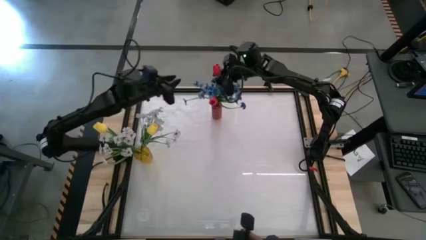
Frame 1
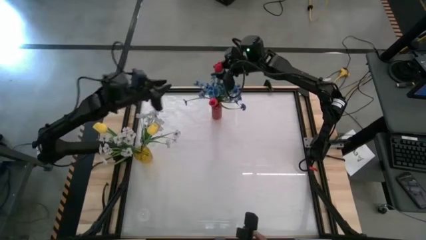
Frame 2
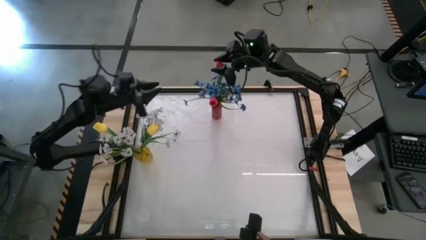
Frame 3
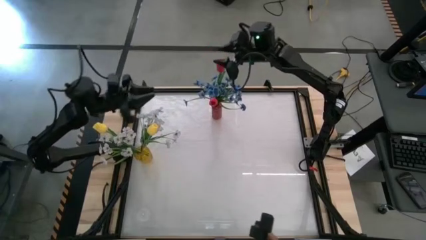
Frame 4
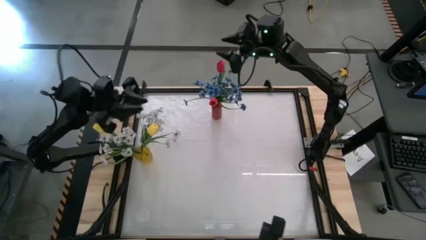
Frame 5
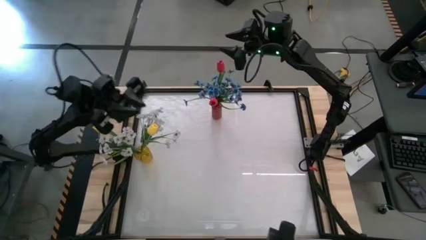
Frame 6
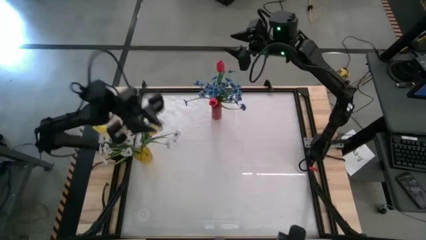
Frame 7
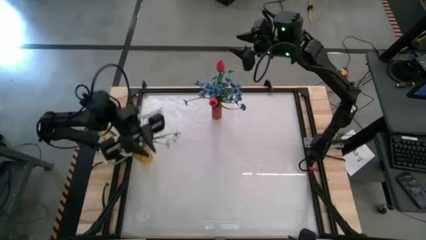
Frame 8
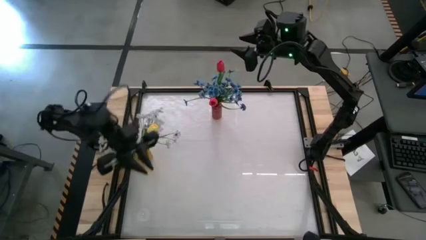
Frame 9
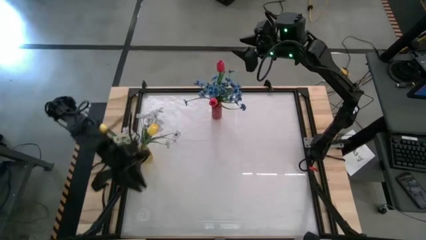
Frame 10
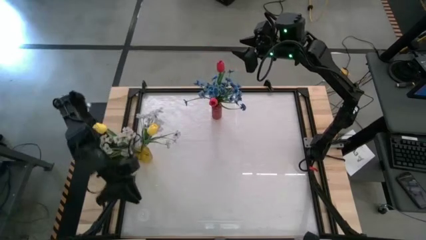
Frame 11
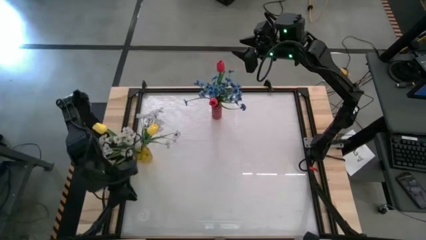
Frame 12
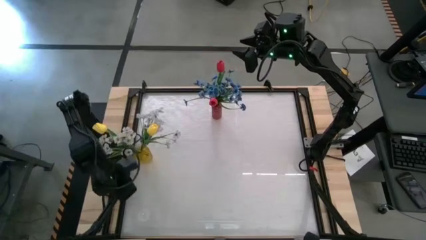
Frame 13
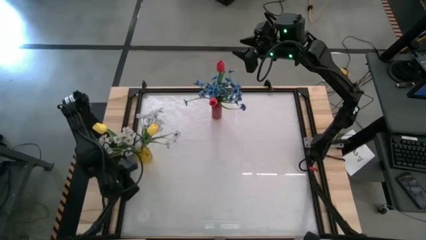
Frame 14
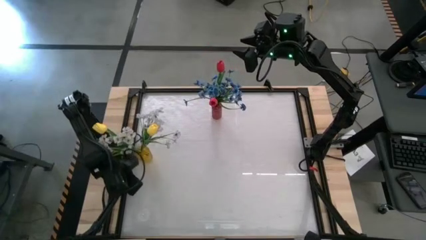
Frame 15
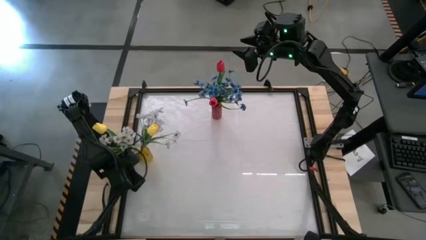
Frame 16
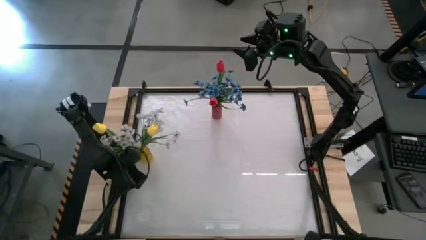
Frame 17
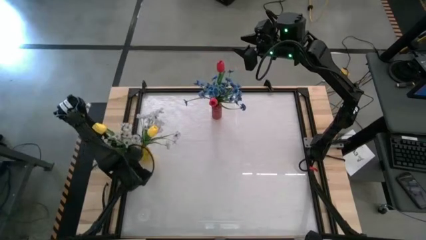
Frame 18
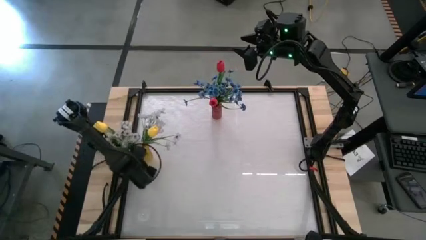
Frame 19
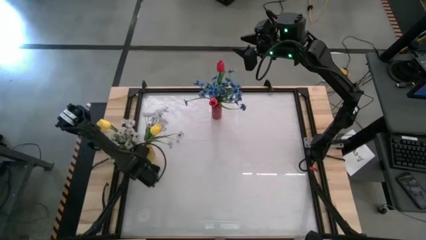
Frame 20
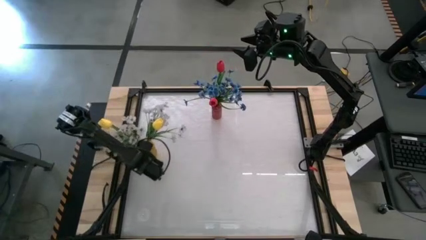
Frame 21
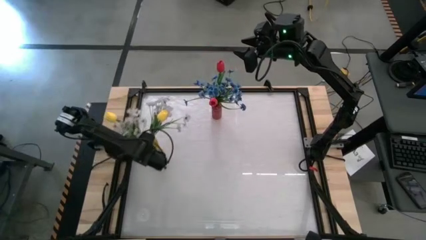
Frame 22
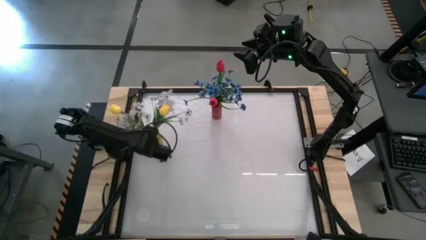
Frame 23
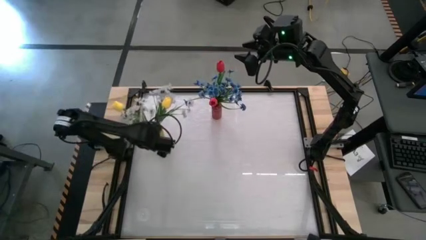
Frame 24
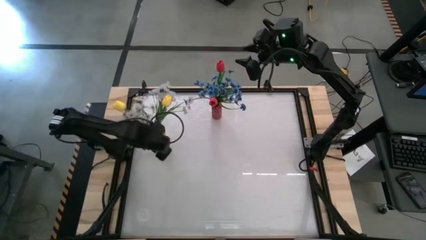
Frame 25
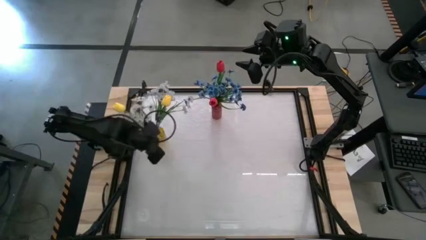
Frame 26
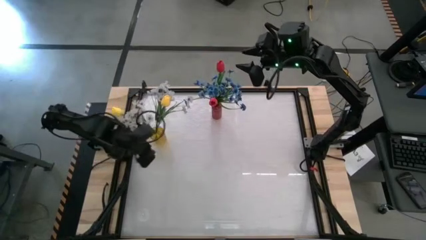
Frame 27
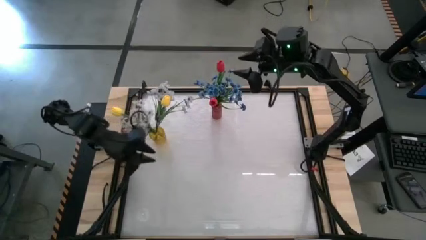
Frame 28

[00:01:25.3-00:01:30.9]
Task: Sort flowers into vase by color
Adjust the yellow flower vase

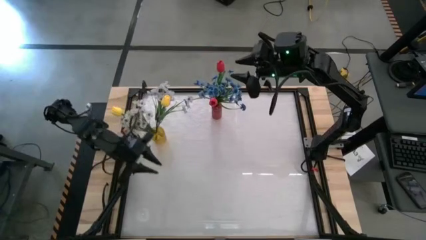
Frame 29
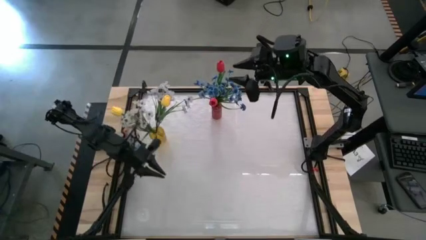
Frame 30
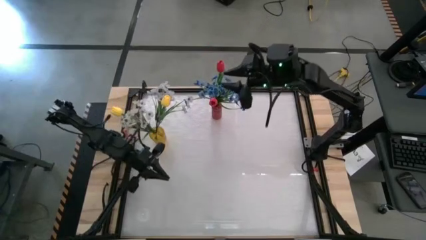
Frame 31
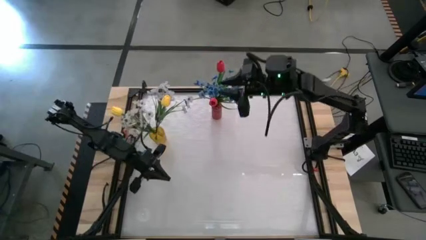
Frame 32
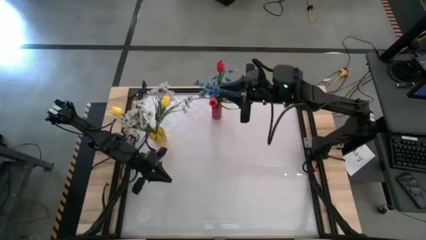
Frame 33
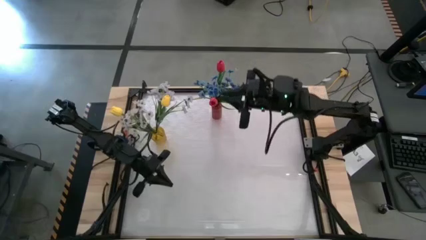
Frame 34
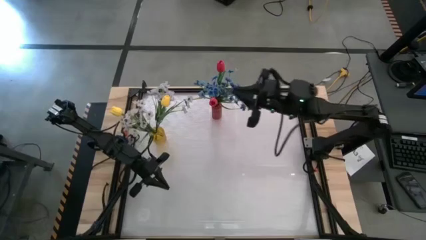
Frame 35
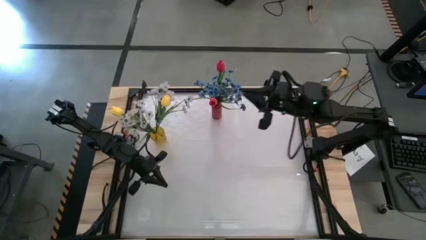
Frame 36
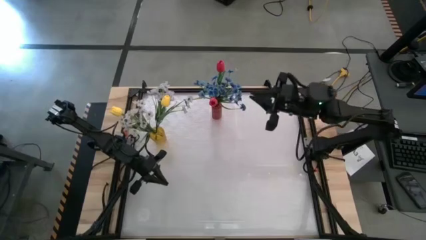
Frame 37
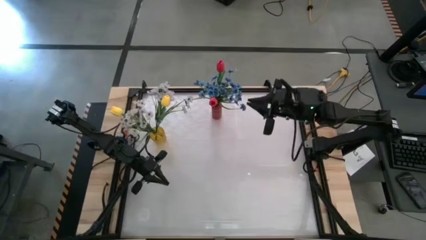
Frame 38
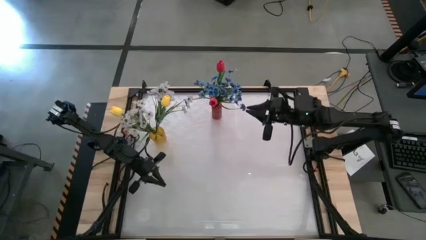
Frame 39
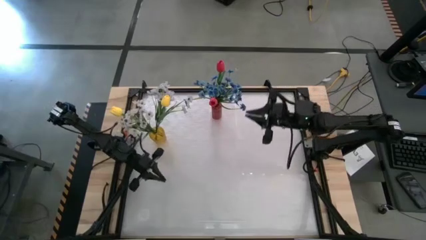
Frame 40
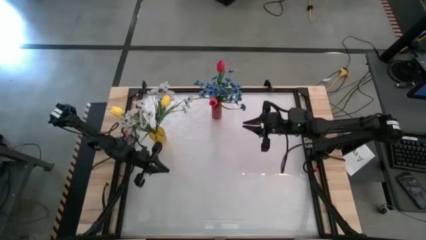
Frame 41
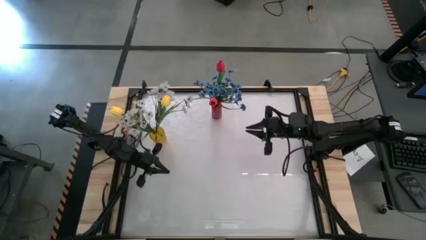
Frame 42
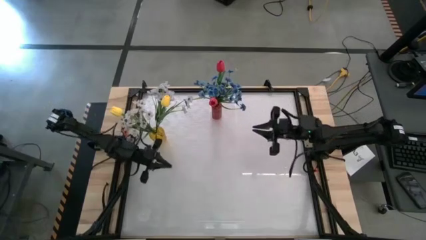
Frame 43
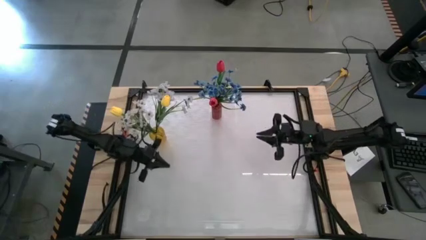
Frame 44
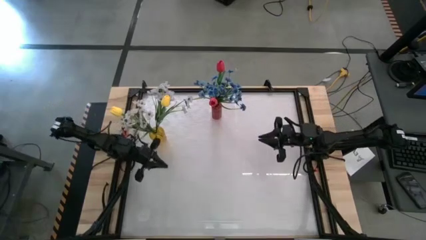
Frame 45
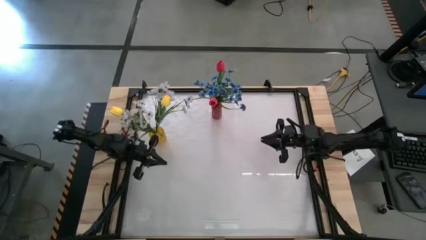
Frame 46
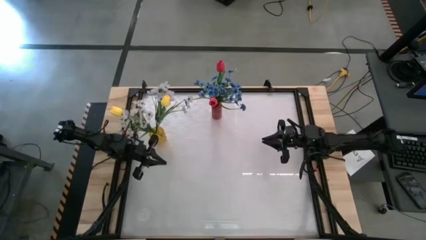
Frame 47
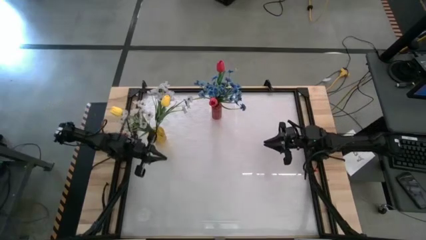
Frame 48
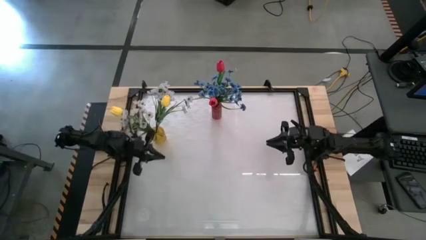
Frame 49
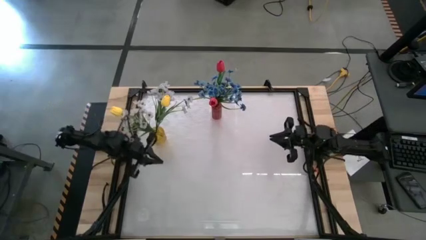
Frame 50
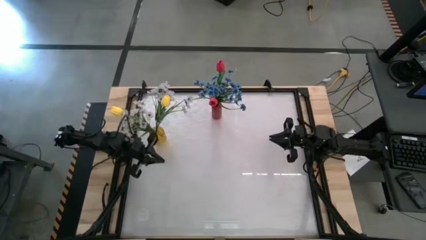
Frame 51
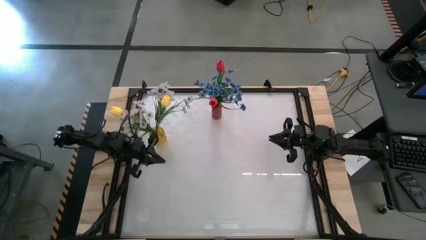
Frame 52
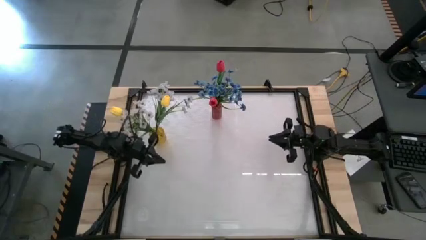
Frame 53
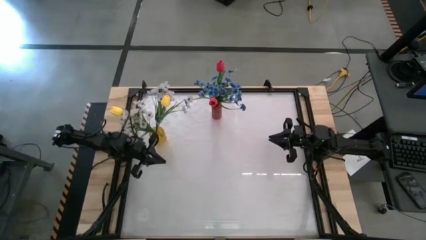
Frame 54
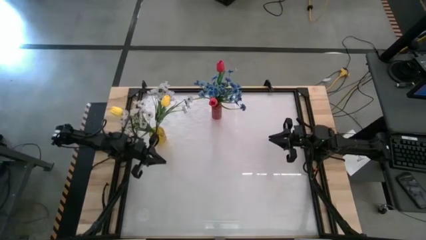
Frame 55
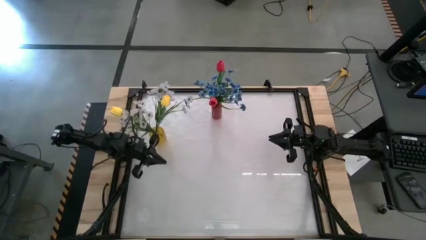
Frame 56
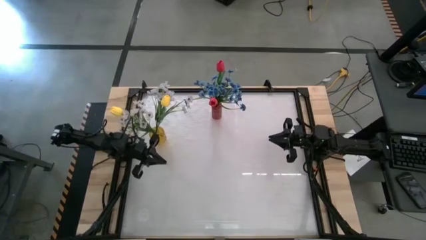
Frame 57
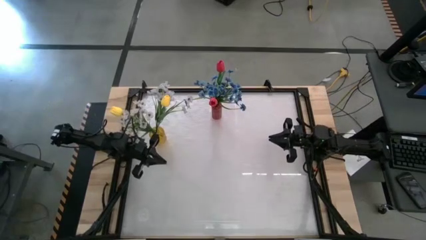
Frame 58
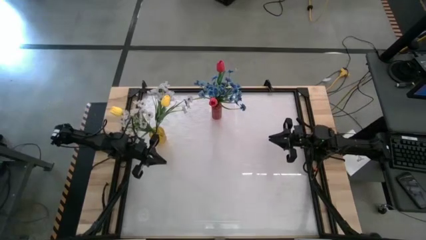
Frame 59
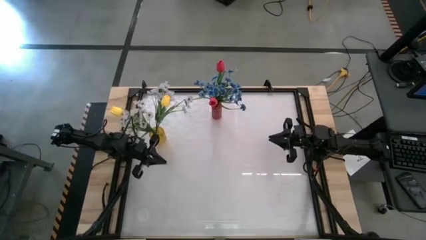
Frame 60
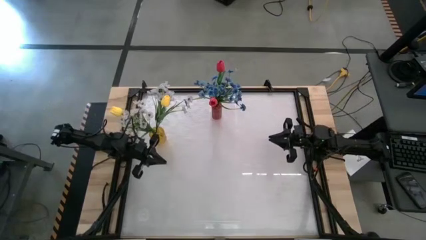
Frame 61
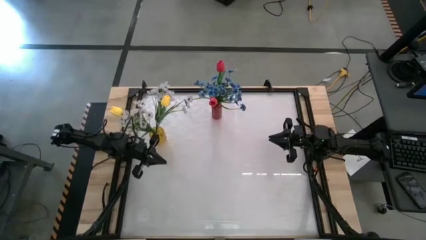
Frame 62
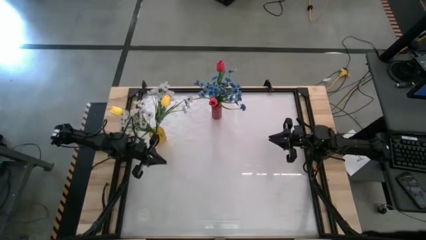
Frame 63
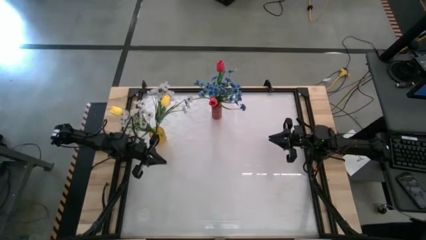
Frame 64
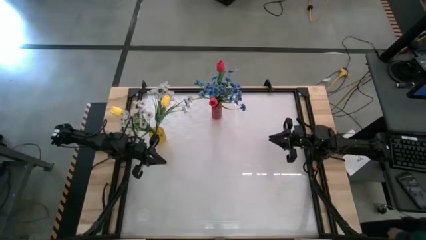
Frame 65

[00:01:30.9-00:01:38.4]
Return to Home Position

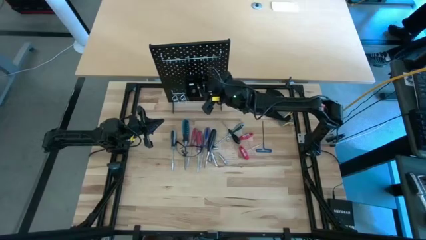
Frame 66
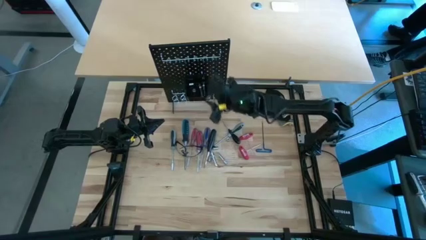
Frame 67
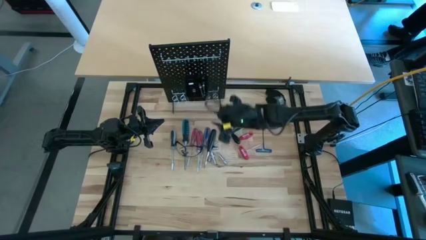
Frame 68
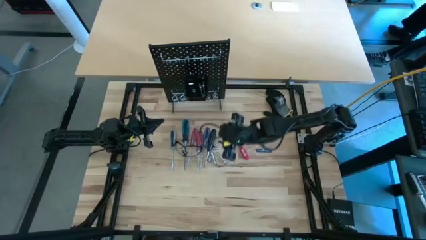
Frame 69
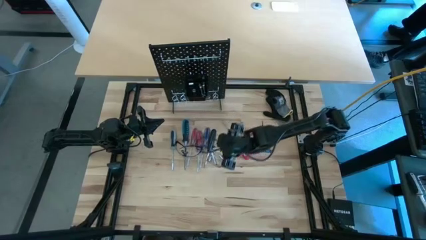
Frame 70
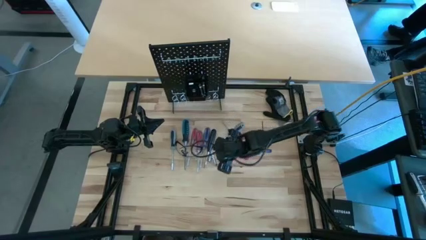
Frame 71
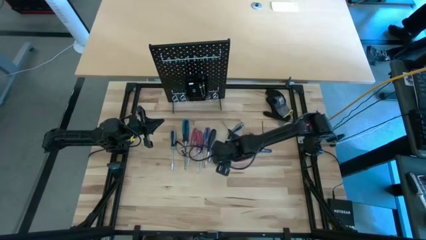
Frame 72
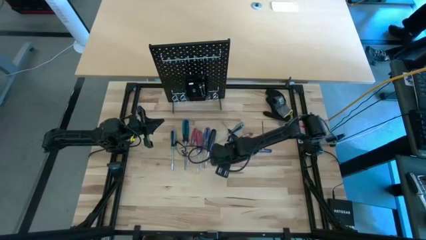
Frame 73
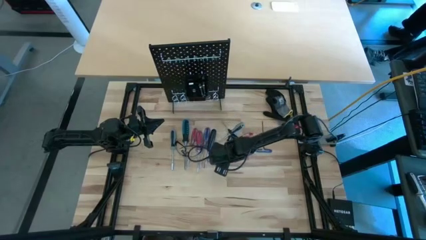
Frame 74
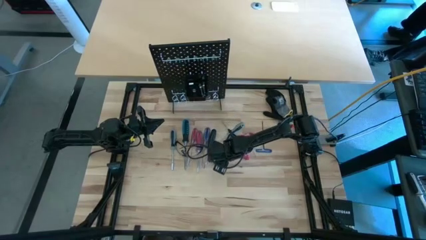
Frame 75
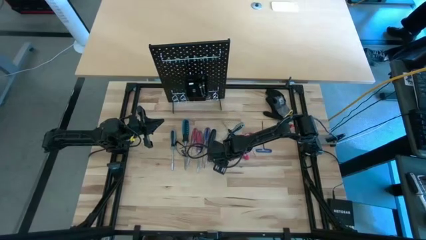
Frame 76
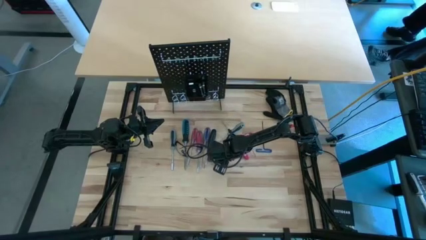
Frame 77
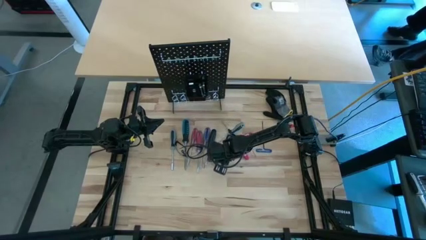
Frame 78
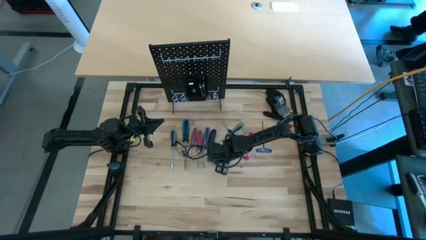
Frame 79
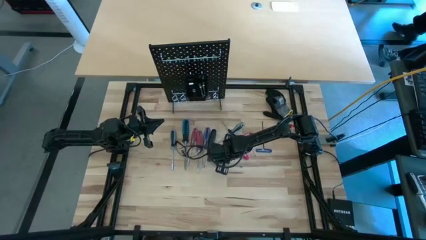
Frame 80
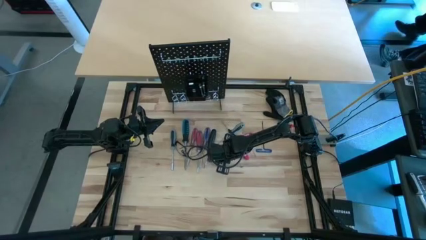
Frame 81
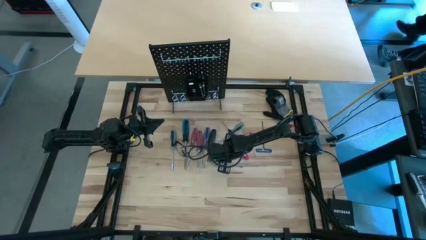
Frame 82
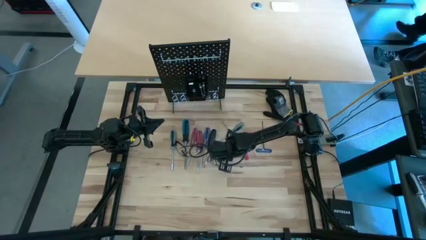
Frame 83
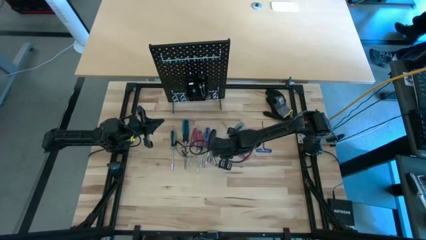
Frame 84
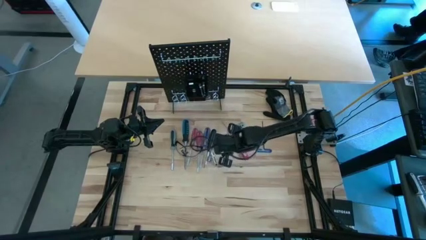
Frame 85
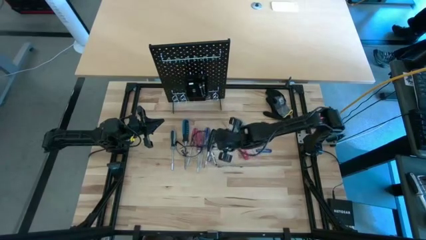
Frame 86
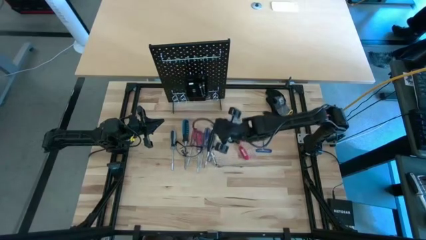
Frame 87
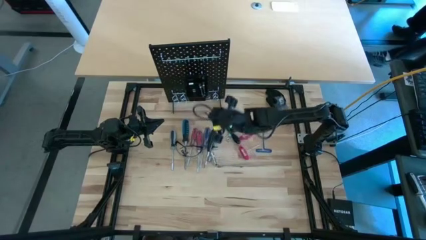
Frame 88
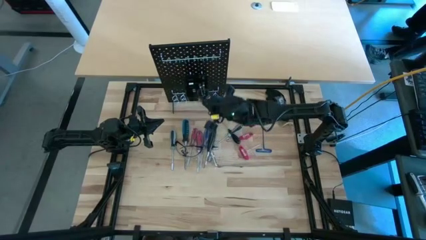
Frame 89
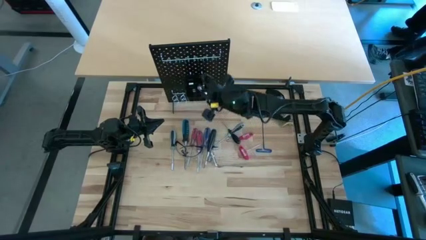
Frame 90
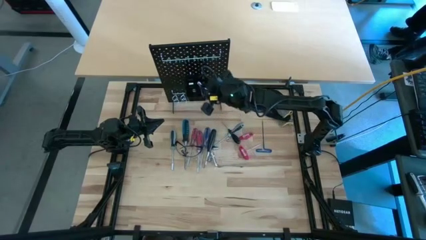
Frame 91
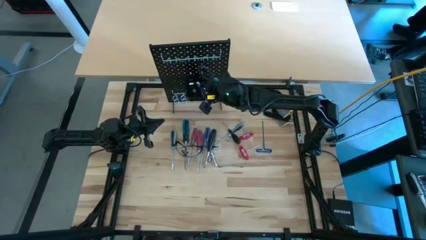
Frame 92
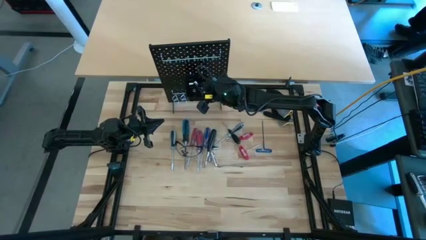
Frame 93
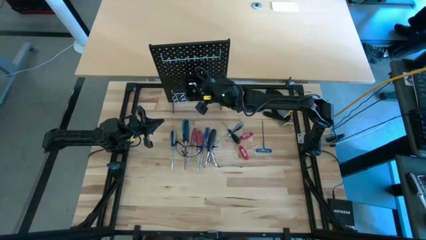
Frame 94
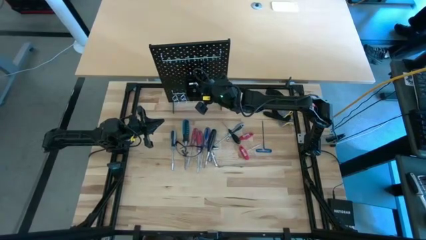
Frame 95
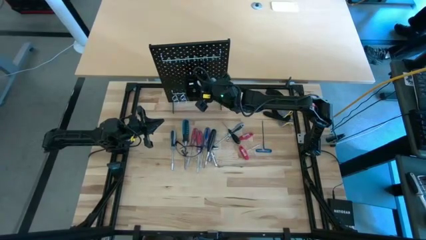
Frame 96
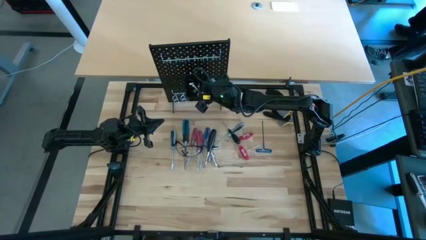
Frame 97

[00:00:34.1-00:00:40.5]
Task: Hang tools onto peg board
Put the right metal extension bar into the black bin on the peg board
